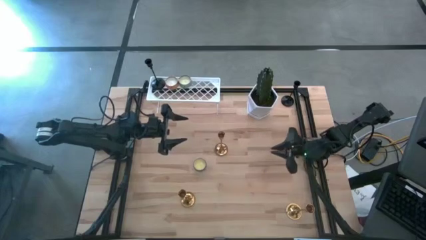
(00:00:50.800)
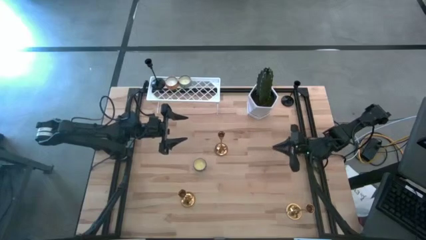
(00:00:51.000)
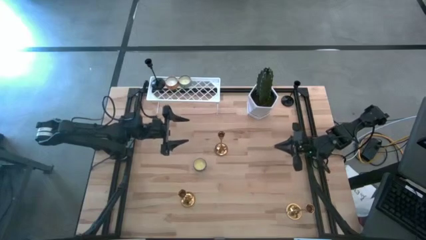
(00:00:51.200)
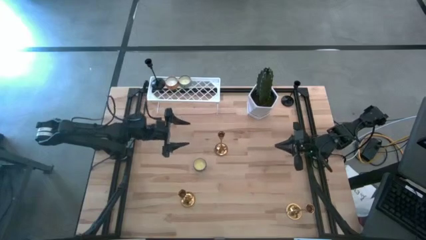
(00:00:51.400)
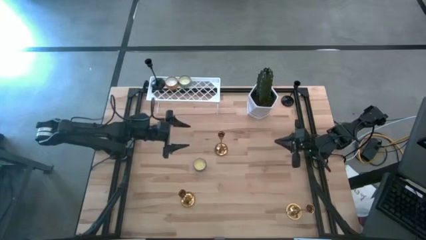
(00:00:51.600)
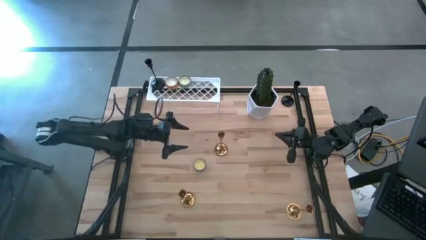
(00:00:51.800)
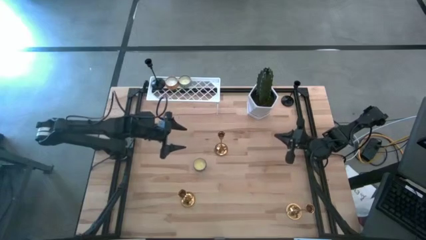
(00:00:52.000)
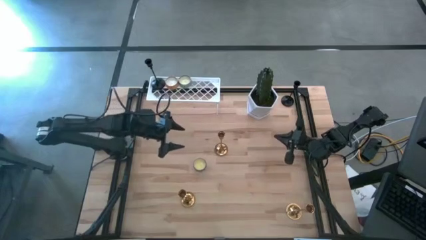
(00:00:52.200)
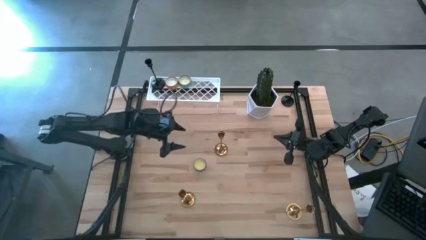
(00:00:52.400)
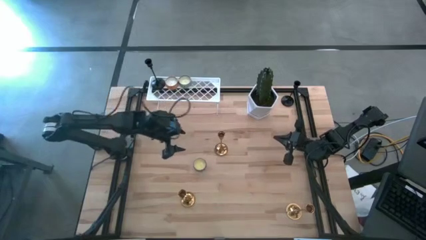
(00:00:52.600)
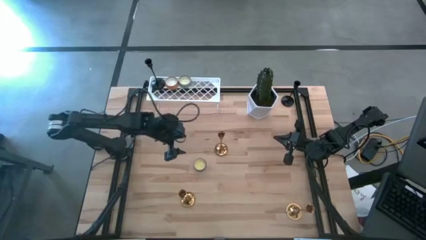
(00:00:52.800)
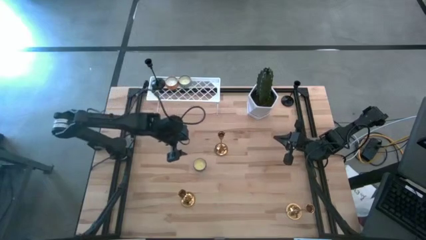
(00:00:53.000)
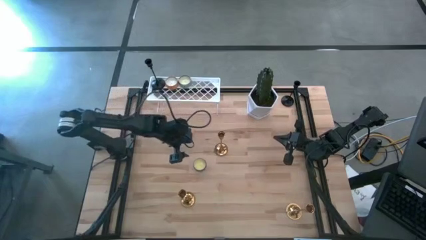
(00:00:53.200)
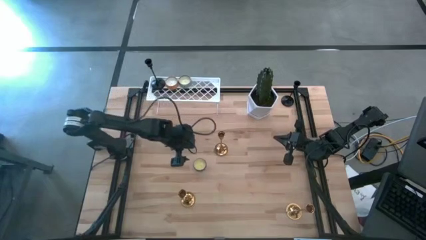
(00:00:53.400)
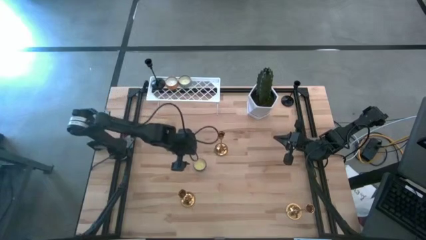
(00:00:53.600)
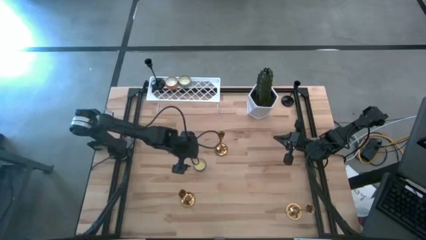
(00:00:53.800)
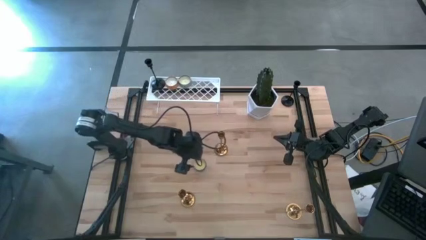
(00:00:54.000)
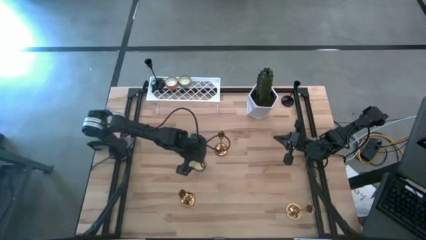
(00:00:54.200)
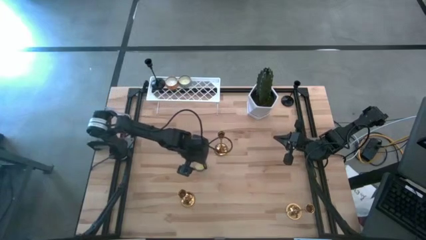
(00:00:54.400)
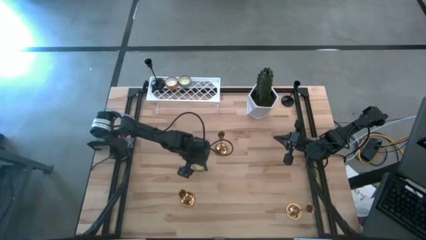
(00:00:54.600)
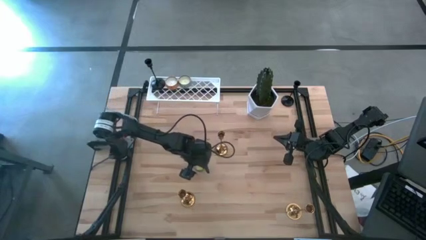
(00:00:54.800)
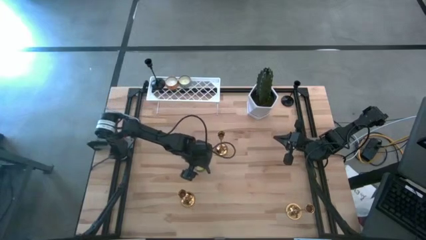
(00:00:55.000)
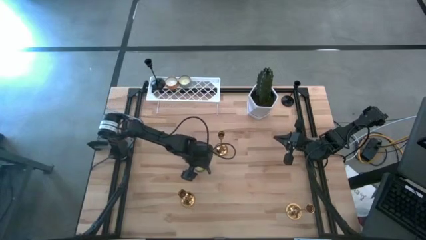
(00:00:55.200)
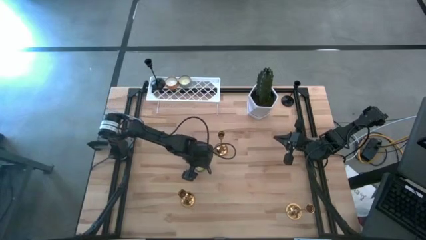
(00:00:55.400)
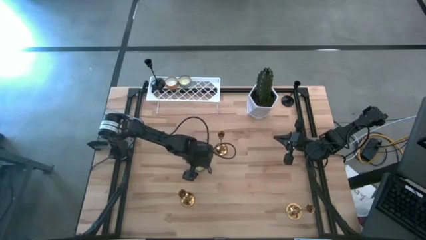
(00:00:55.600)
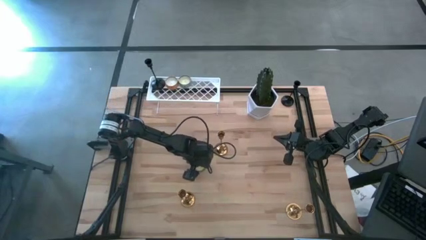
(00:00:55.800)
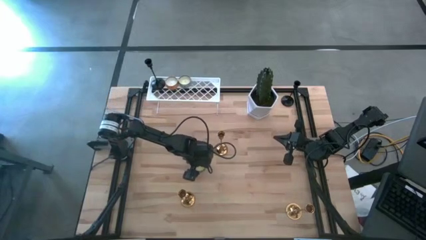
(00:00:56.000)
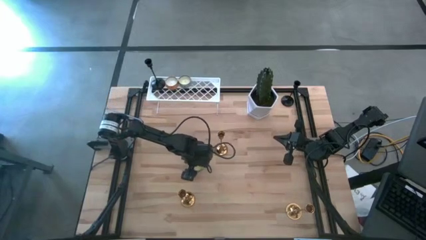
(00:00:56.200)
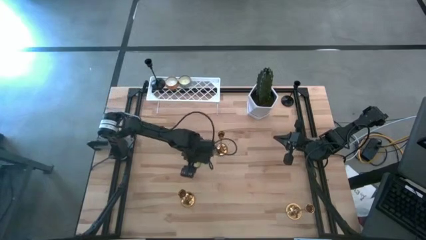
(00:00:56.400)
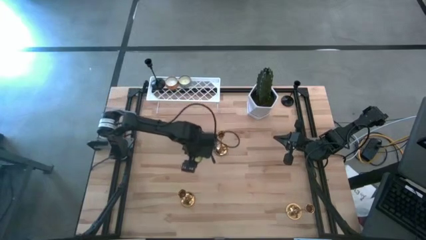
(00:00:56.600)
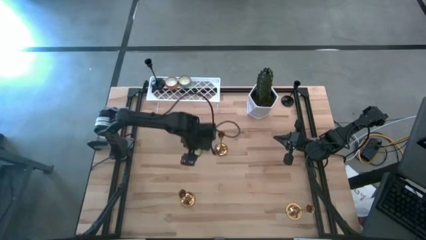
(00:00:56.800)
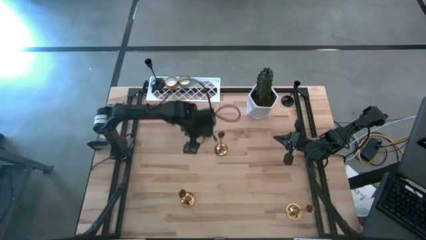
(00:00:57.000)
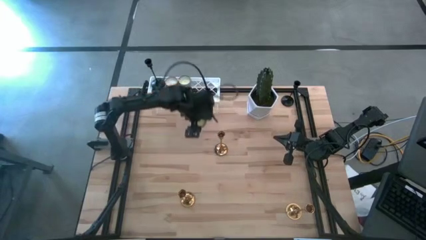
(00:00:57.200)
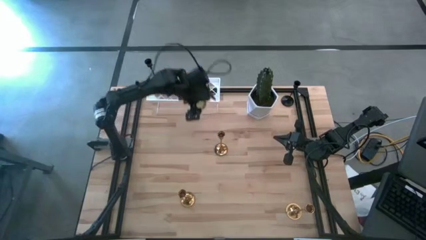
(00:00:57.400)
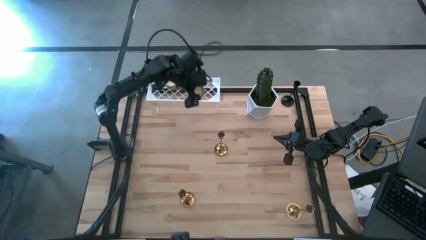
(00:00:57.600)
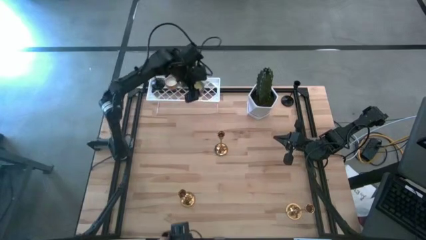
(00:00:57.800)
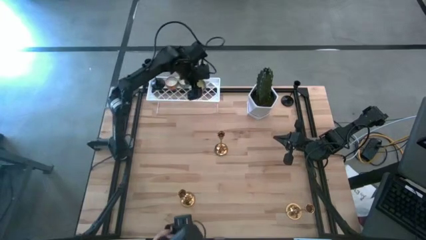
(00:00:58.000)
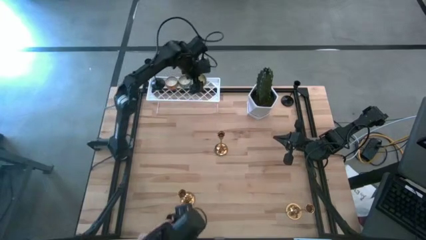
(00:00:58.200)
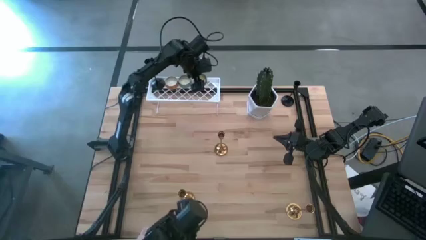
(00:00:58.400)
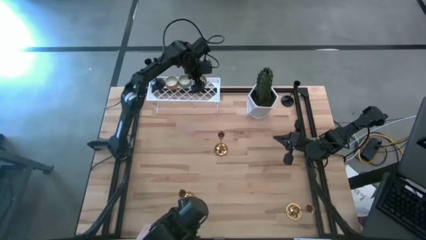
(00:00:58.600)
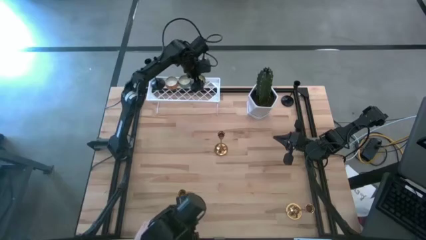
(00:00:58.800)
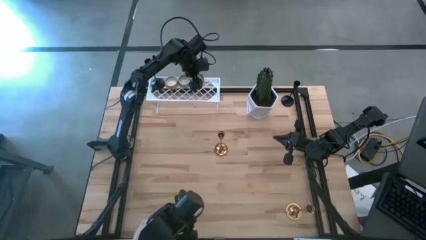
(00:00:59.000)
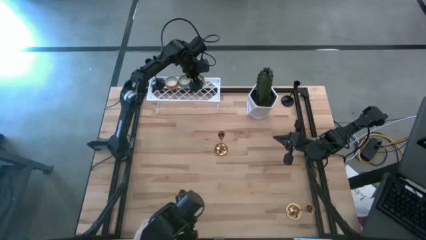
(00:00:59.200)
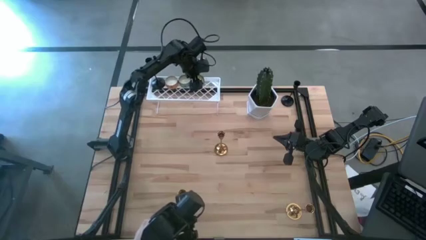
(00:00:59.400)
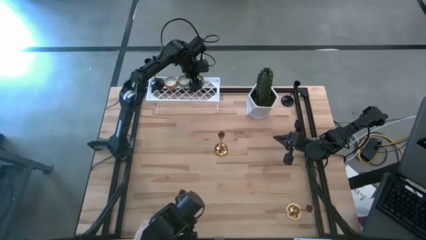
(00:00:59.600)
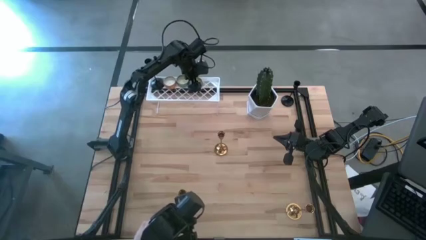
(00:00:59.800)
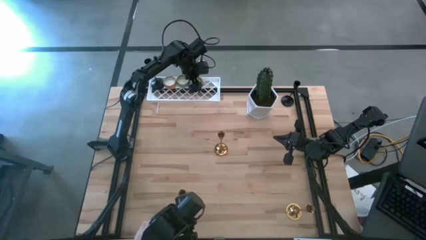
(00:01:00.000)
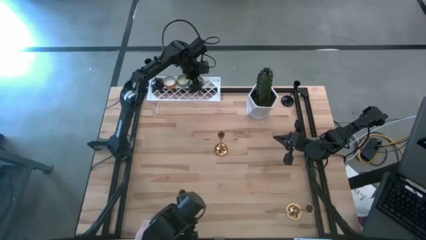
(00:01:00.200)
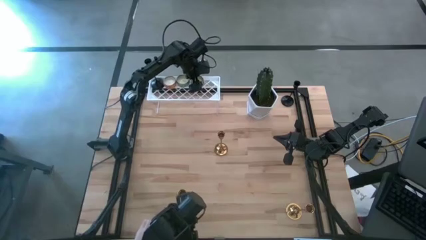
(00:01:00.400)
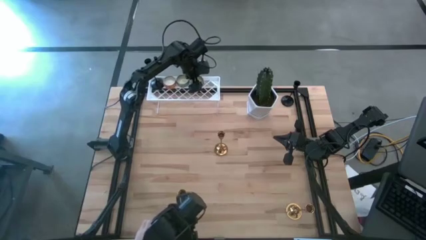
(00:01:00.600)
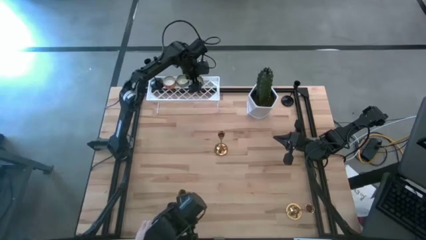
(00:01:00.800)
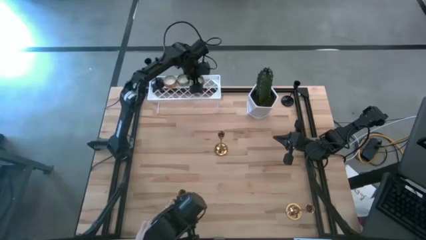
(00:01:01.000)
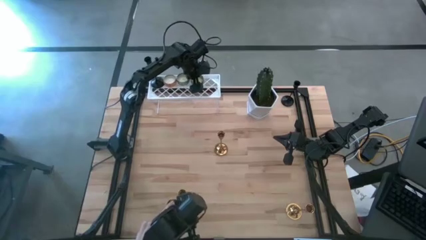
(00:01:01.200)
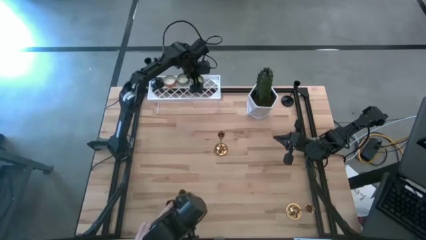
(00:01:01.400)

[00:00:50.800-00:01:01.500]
Task: Pick & Place candle stick holders
Put the red scented candle bottle on the shelf

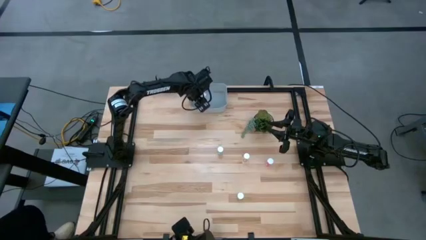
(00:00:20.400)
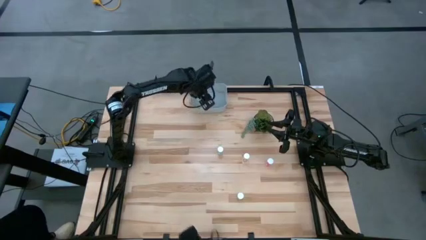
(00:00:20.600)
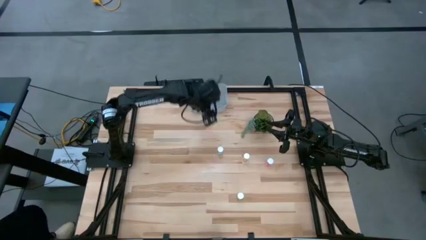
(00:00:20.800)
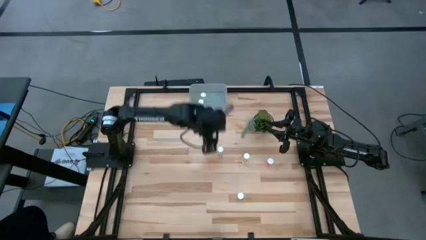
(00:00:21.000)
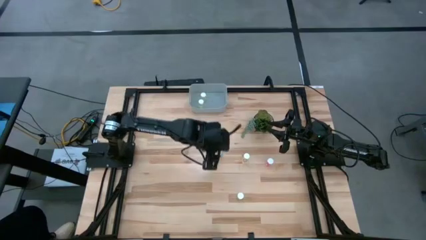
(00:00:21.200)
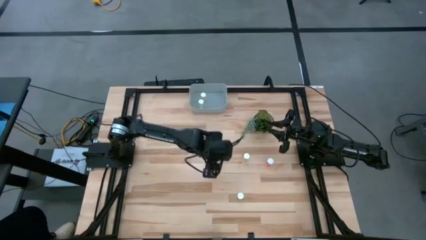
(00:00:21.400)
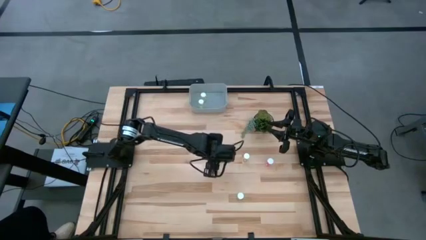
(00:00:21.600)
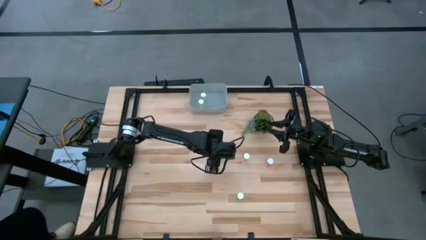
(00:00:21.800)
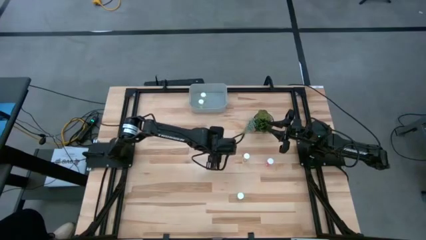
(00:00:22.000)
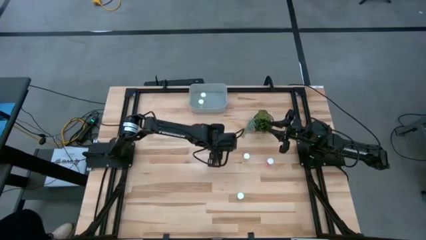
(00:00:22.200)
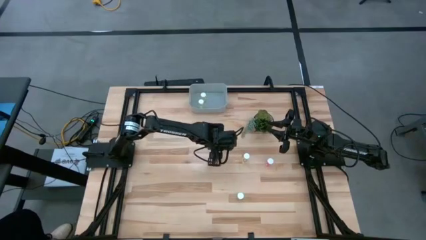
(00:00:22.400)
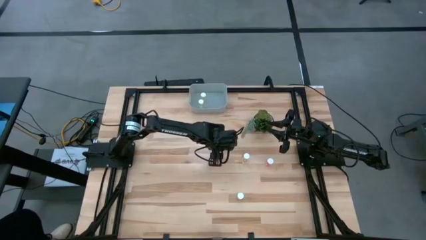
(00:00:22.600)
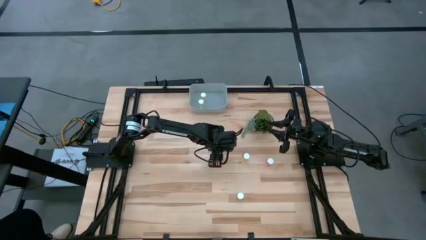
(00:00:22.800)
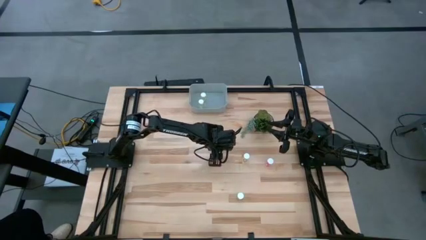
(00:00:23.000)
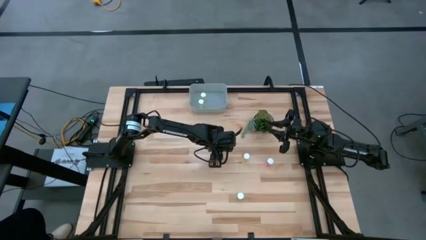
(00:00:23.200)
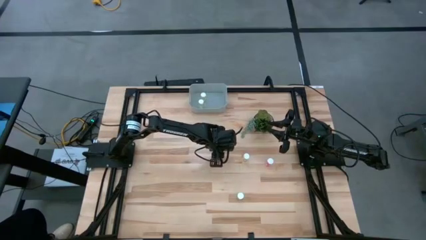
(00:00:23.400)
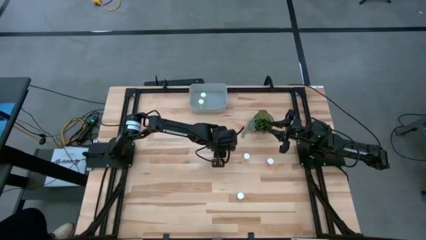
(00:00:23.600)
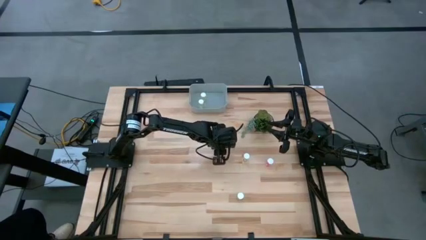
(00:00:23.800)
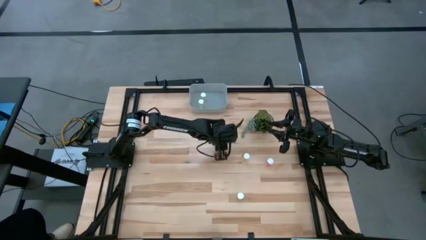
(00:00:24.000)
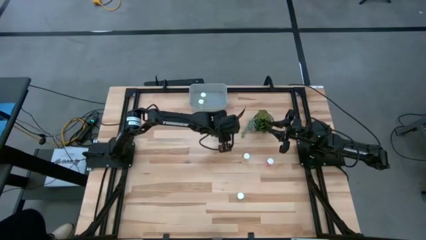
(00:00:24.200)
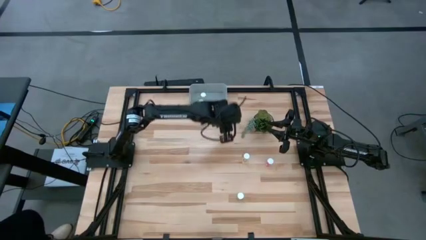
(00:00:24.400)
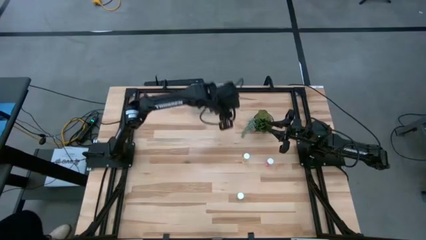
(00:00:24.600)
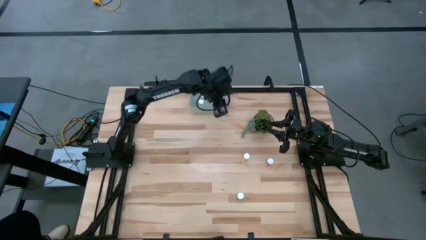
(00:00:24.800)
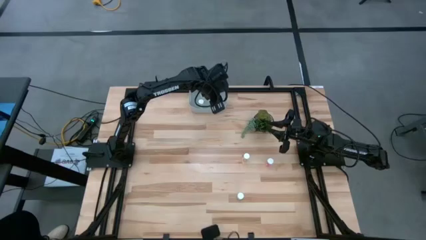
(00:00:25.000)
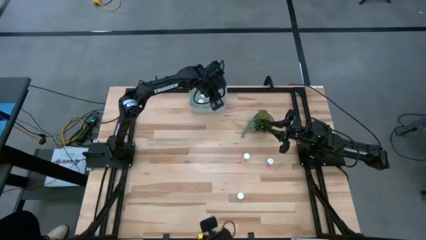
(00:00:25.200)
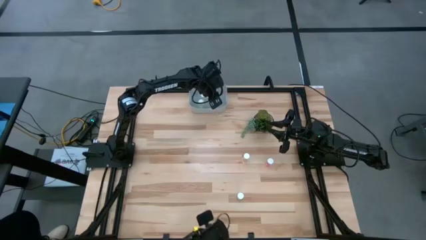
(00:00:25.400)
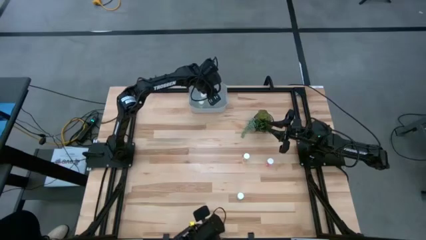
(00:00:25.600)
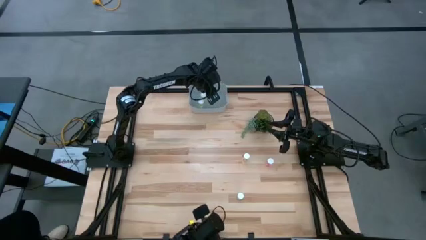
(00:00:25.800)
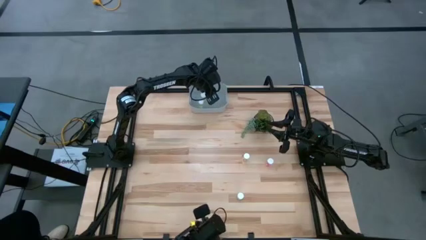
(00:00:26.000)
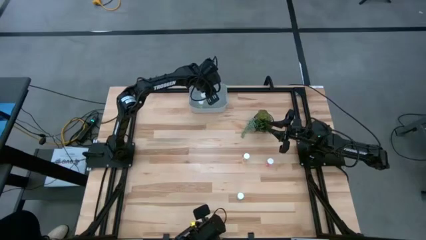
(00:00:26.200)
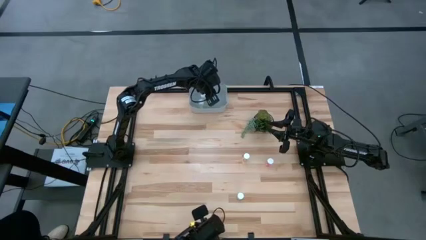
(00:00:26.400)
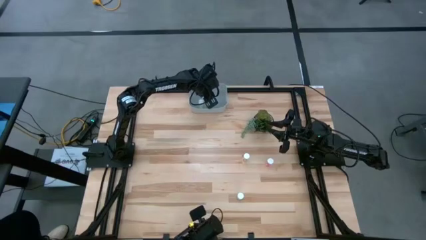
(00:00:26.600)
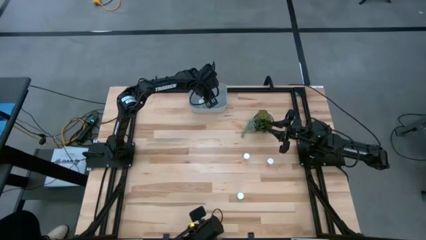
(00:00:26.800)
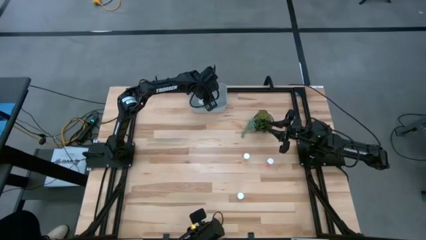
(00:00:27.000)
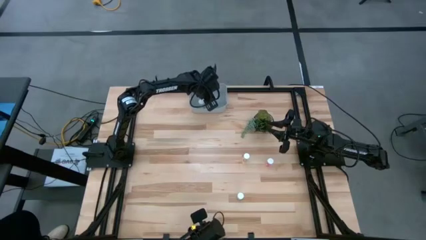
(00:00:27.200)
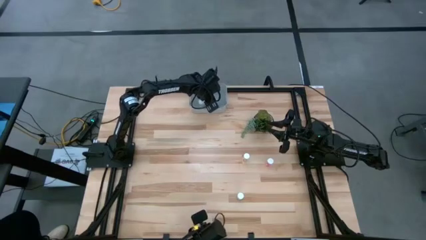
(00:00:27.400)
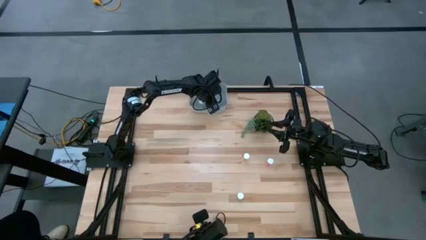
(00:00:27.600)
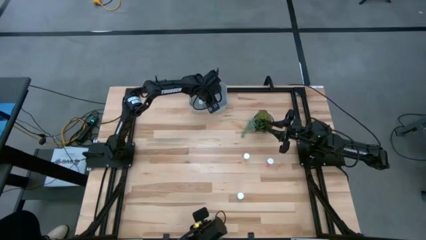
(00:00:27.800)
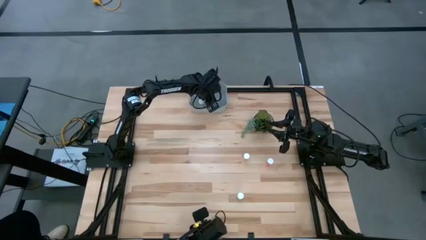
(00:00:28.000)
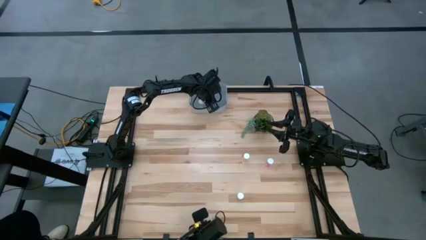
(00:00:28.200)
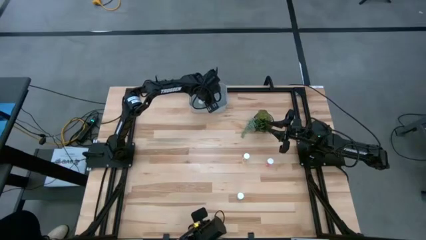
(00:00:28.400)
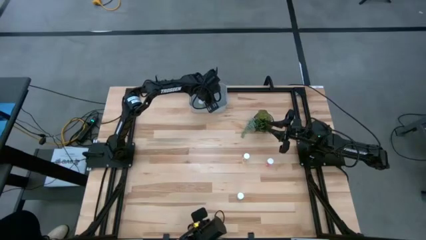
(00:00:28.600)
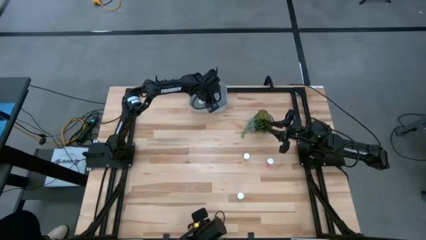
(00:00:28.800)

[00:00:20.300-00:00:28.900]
Task: Pick and place pill bottles into a basket
Put the top blue medicine bottle in the gray bin
